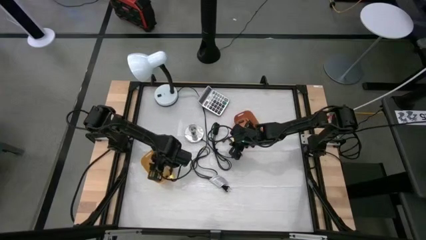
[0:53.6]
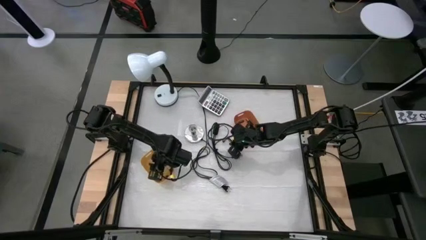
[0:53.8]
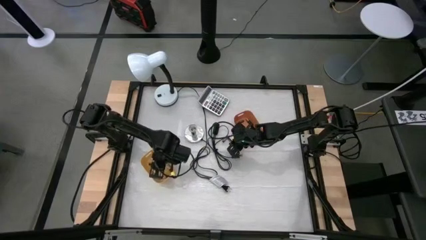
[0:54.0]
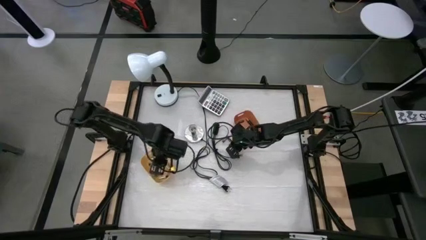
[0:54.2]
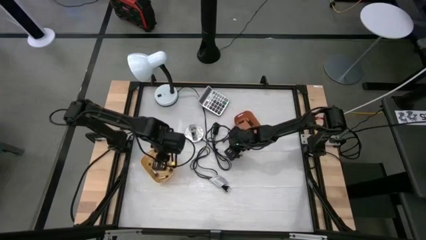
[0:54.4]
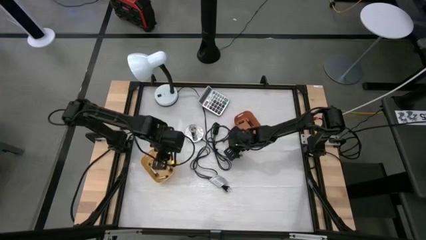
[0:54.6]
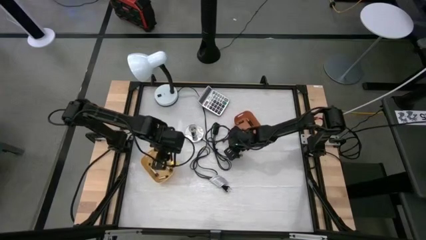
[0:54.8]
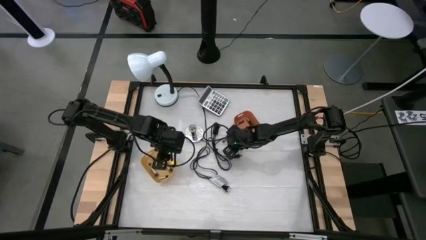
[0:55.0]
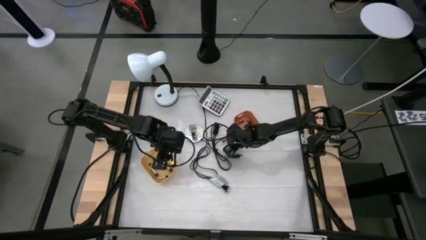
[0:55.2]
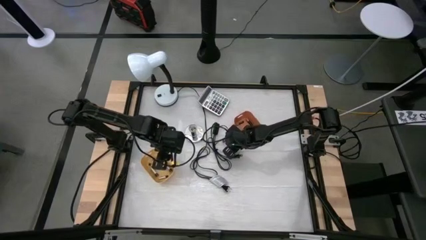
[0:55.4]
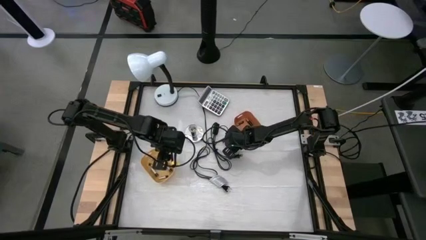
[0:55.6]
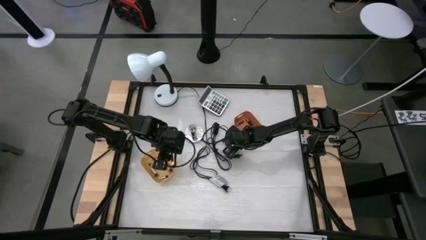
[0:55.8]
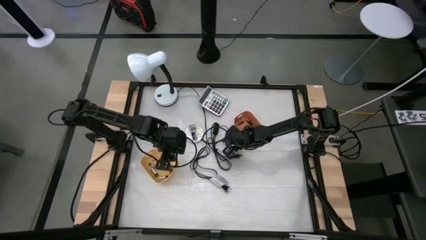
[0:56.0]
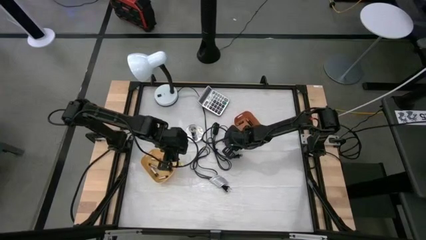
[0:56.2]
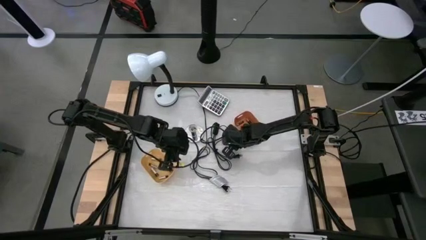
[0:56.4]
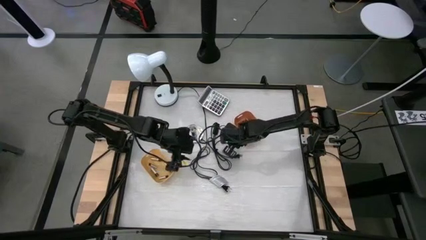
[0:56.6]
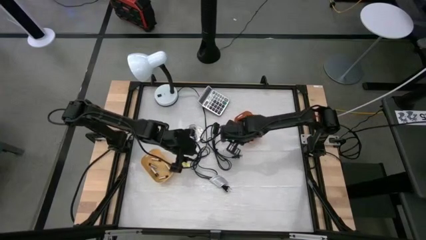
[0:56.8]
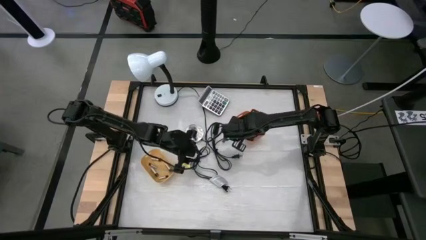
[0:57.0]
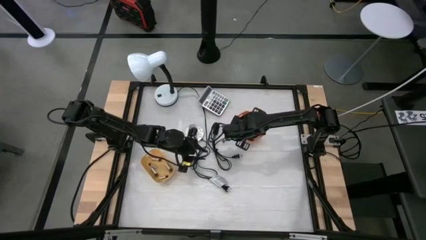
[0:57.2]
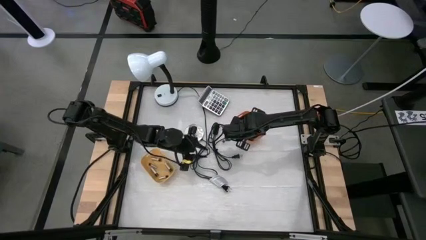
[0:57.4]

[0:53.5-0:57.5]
Task: Sort batteries
Put the brown battery into the orange bin

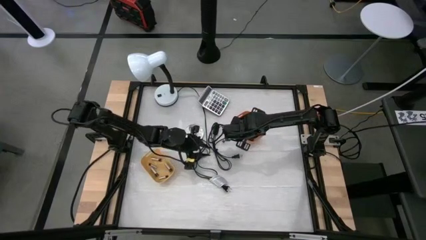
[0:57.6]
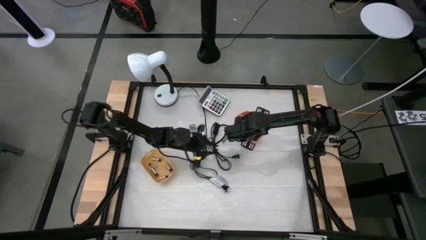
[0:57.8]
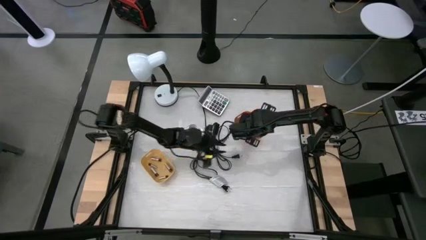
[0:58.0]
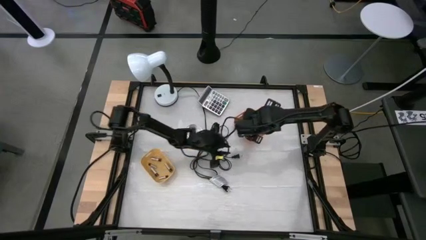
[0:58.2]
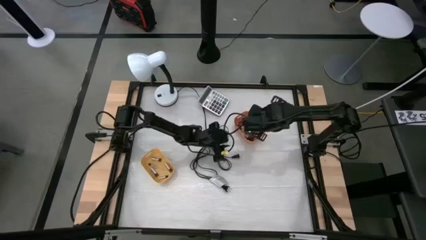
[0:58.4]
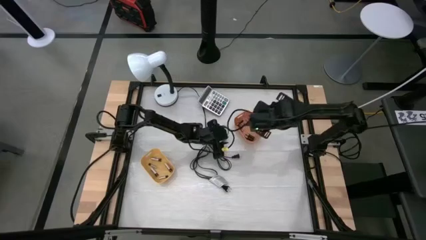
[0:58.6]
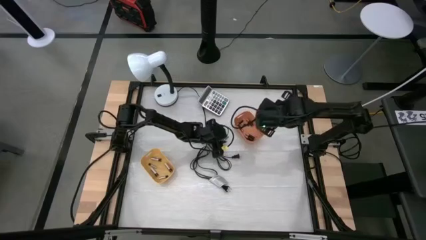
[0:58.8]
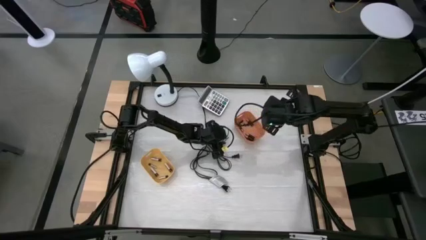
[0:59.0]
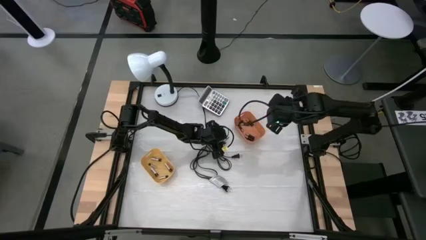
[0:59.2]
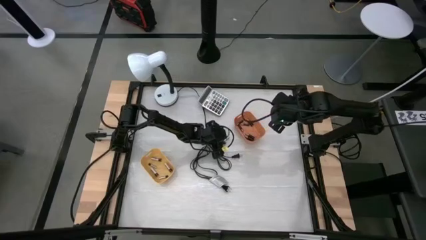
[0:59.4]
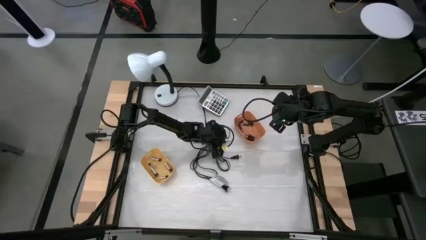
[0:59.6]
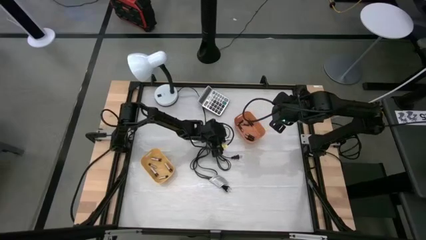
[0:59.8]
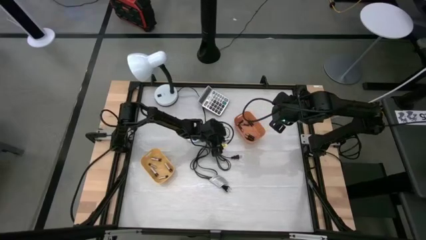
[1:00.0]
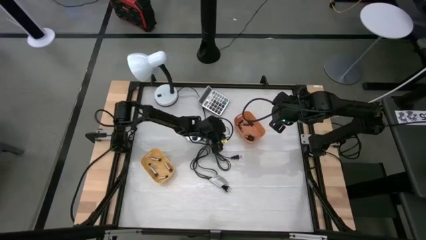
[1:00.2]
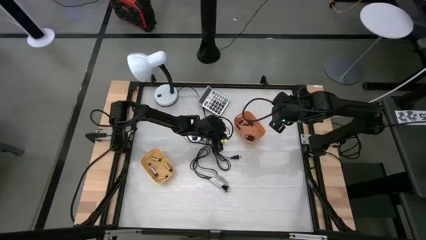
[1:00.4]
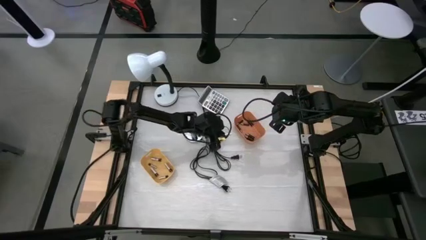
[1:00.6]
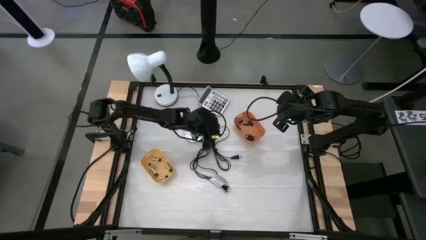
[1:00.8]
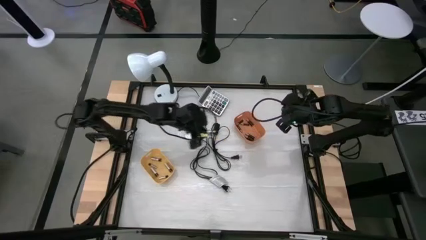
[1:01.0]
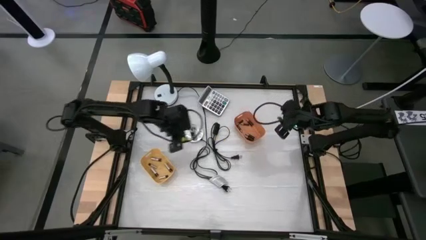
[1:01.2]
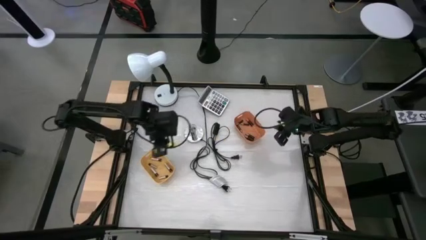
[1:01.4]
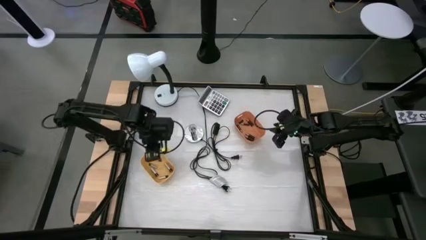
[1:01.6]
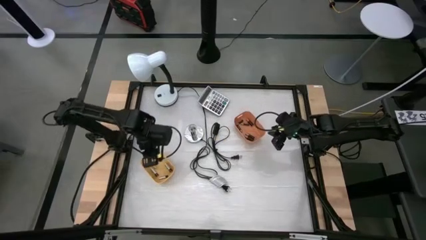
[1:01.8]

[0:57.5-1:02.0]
Put the silver battery into the yellow bin

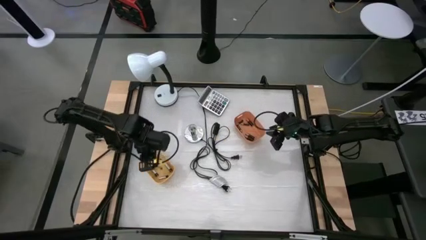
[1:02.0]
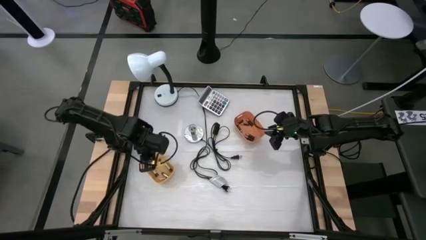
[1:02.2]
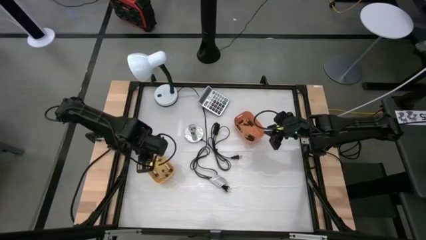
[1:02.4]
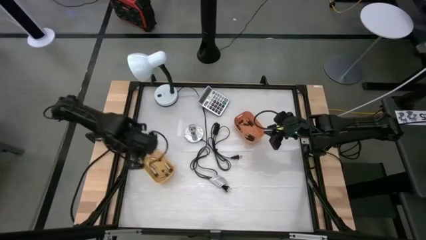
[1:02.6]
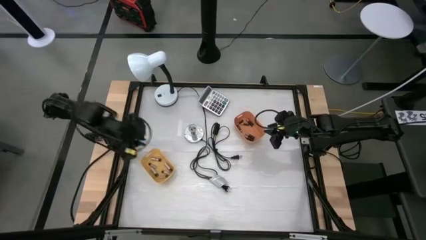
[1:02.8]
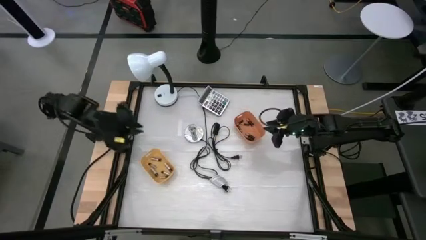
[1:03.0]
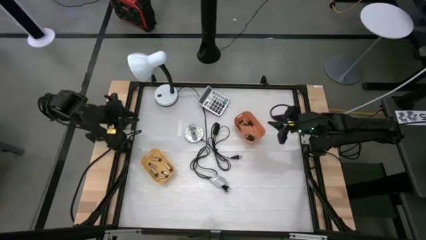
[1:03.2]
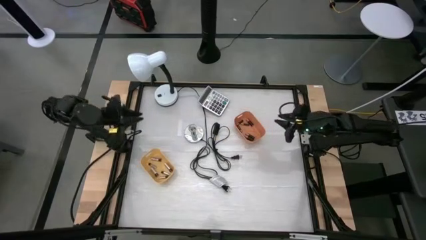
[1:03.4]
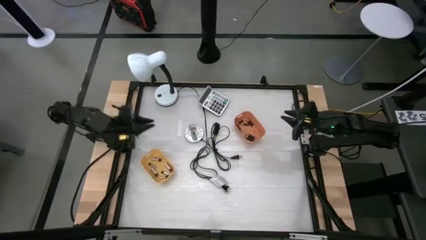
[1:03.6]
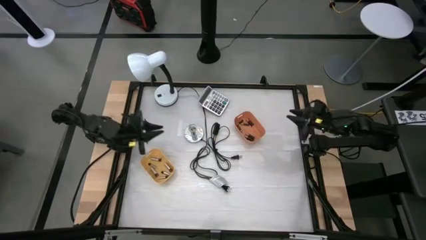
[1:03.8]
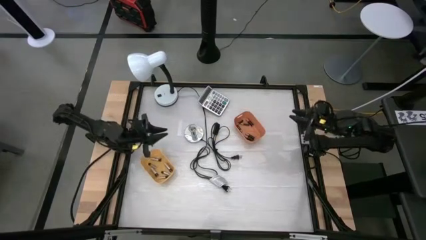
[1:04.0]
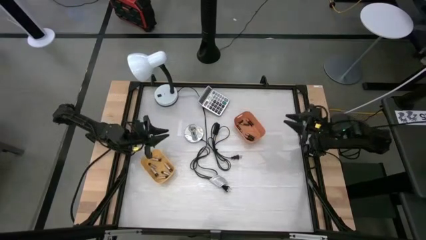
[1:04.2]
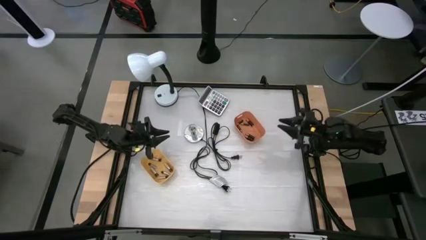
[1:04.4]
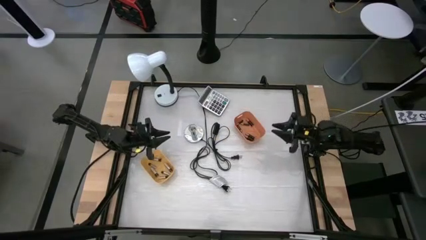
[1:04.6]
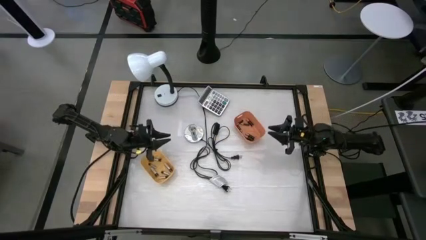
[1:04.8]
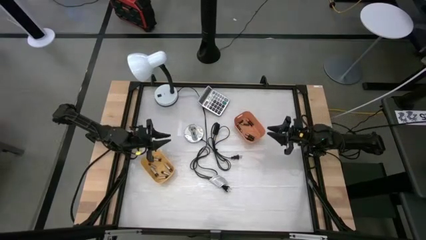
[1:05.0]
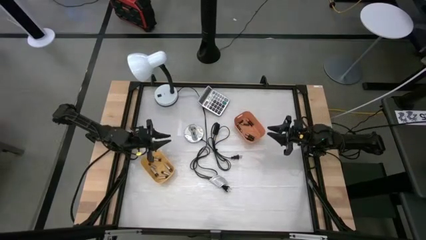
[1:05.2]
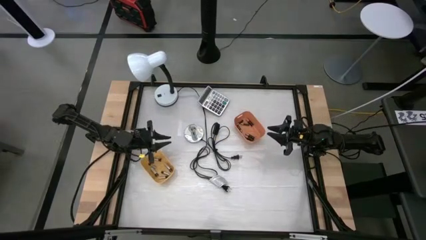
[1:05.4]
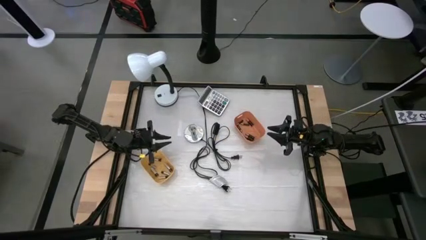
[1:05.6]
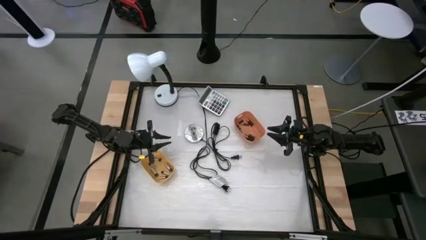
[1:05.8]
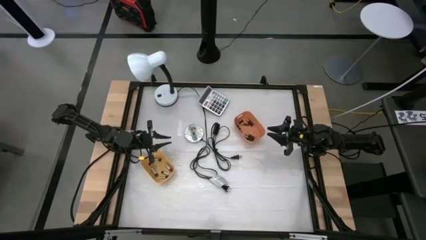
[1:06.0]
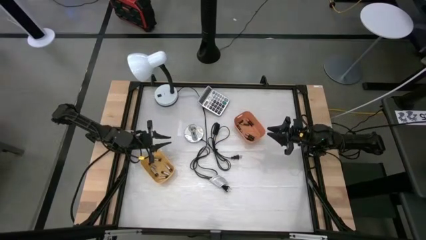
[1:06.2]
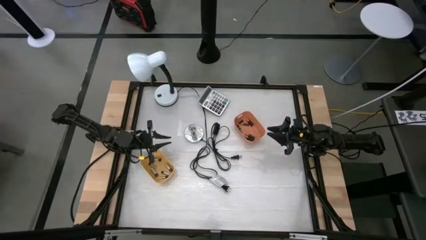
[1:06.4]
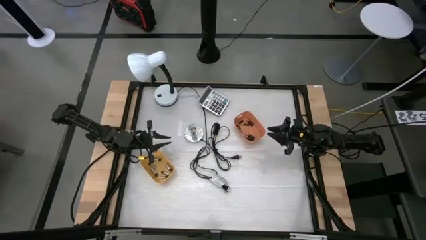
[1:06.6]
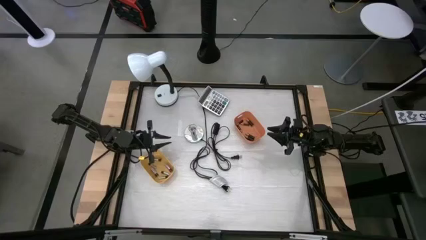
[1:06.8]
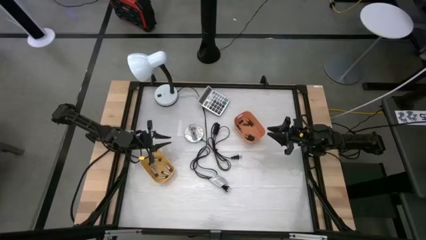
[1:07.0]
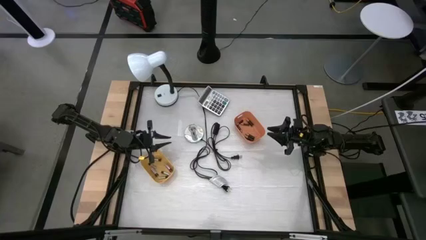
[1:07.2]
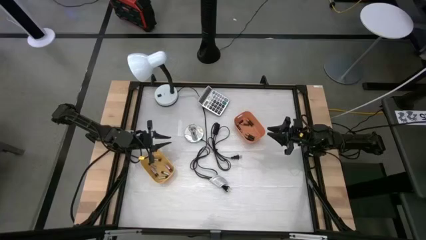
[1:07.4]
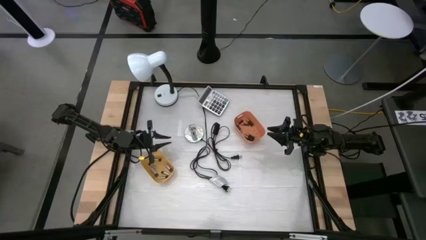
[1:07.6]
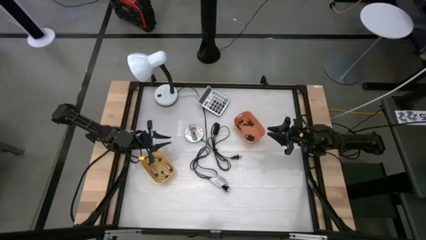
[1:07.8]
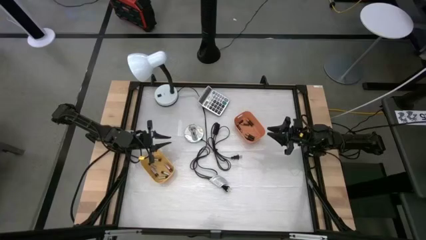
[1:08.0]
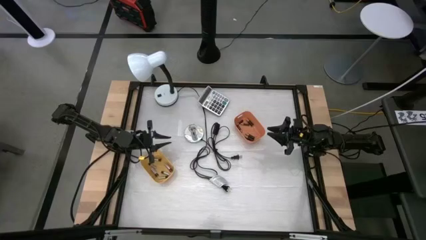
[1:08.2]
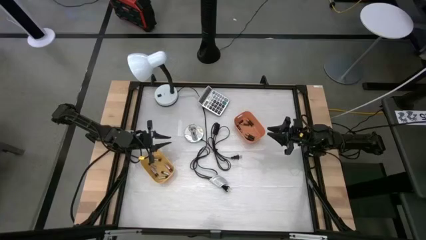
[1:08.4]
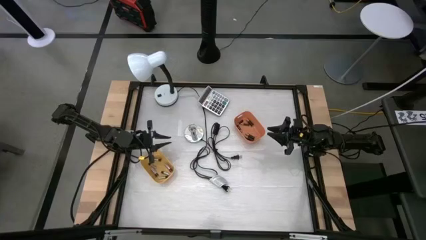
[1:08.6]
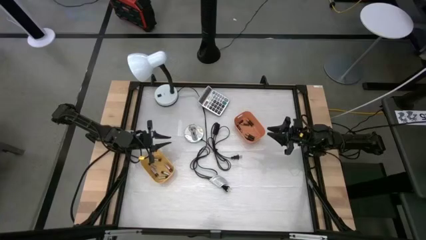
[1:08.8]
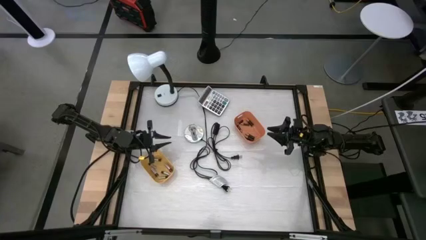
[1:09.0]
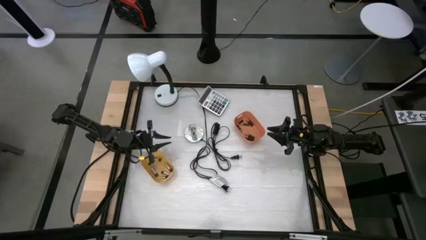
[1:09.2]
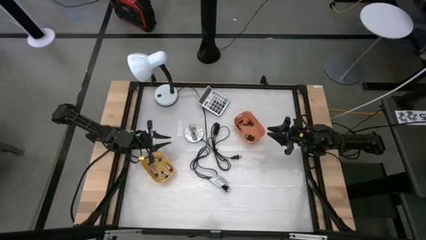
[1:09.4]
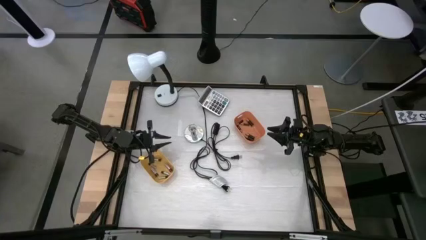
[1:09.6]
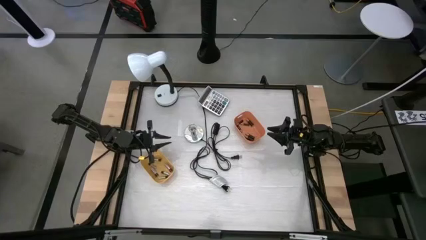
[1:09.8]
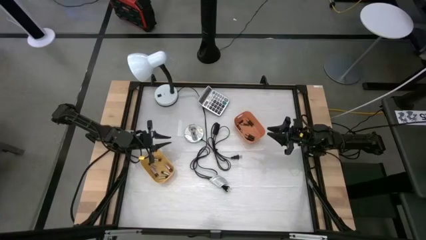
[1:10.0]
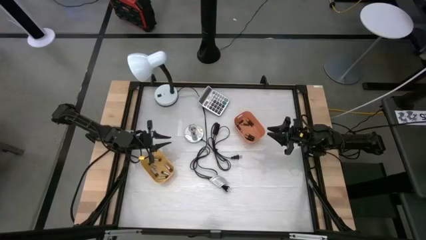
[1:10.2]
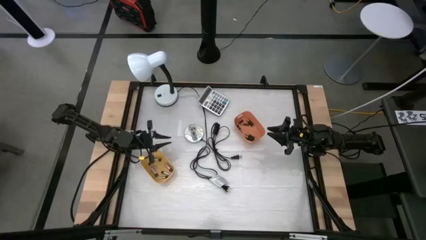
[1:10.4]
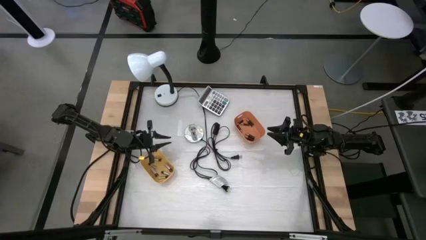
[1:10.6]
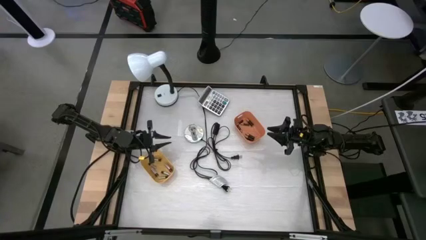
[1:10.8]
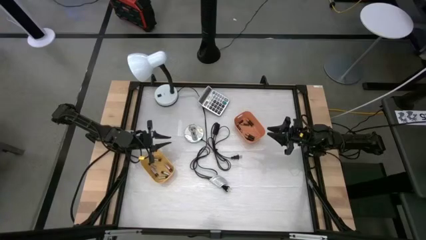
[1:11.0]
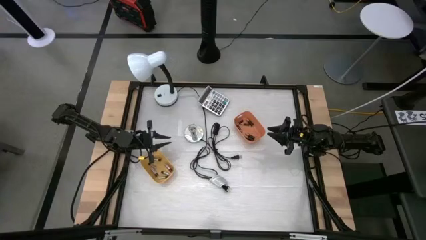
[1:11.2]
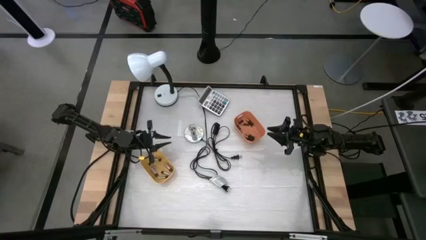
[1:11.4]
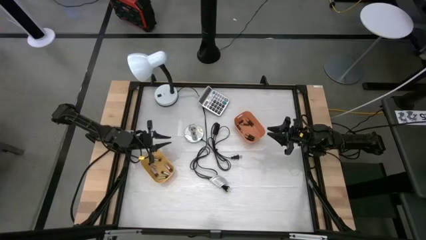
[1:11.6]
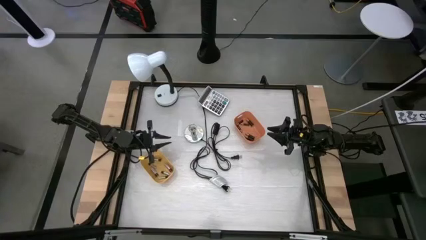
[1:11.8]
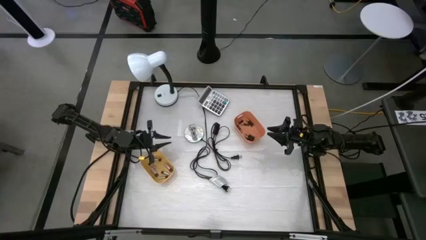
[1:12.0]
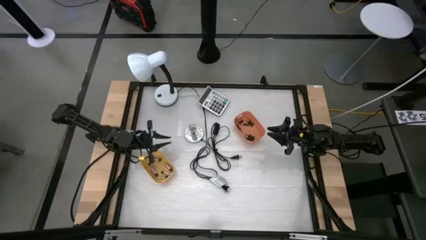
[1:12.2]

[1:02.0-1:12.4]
Return to Home Position
